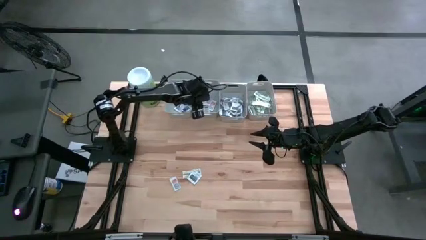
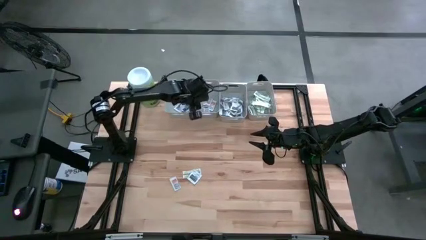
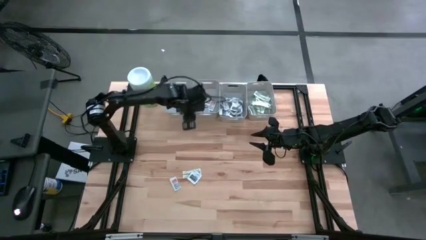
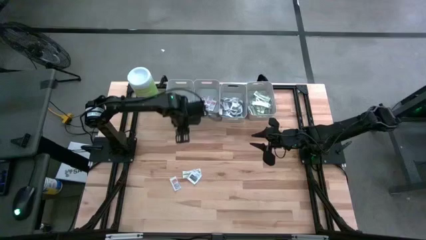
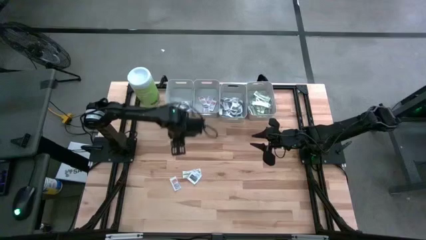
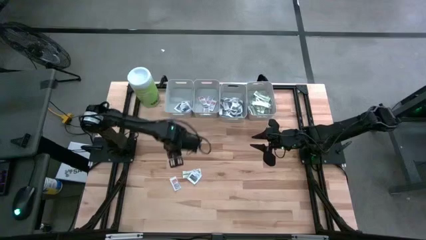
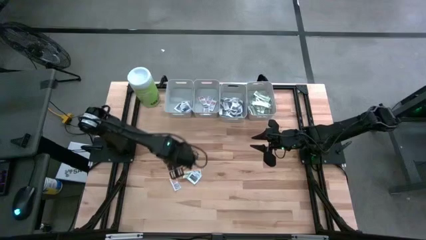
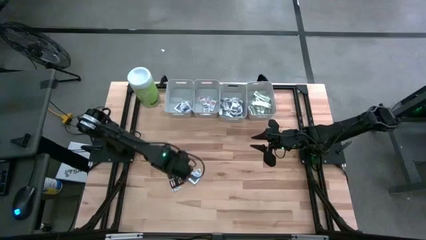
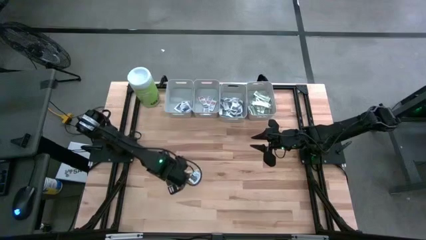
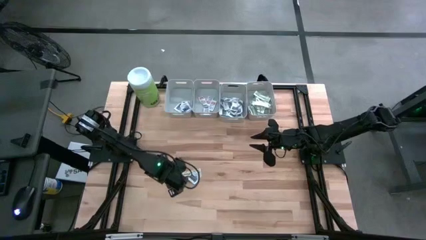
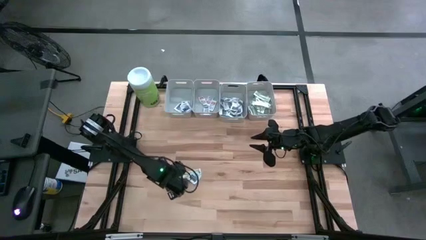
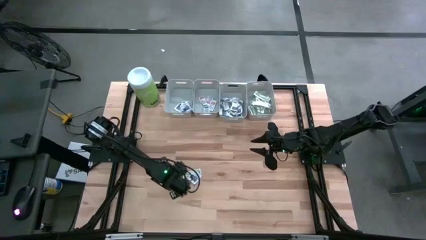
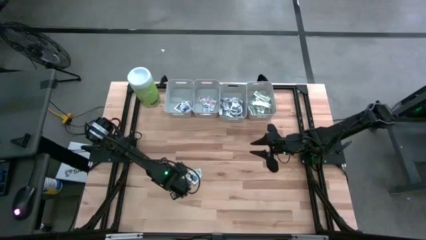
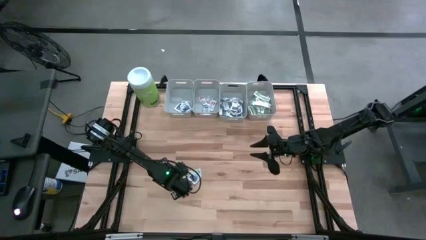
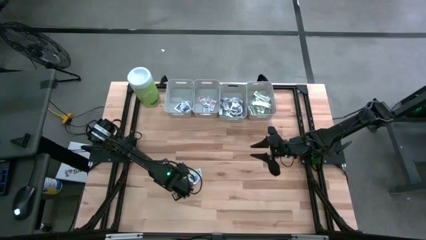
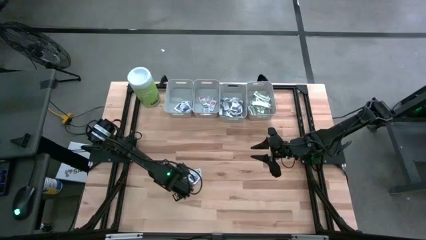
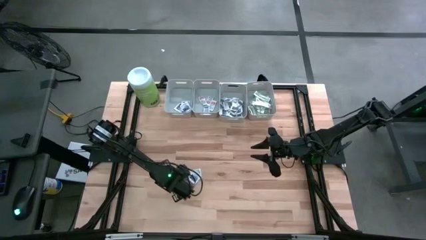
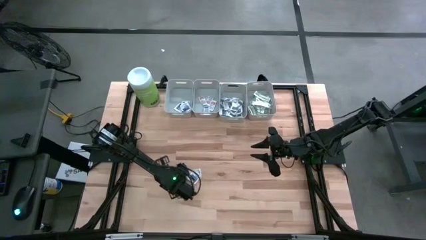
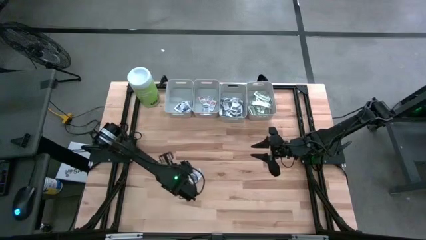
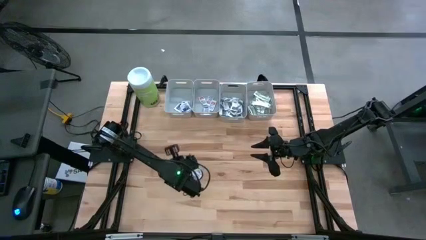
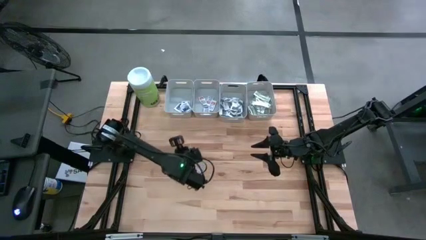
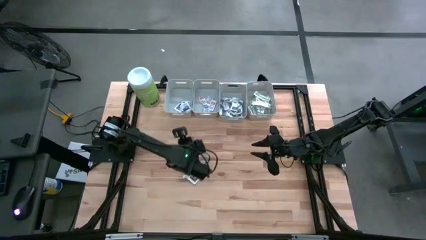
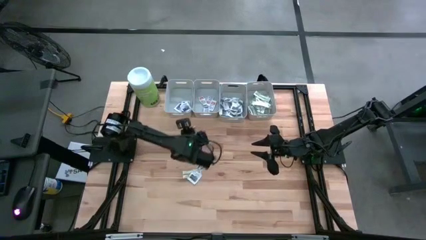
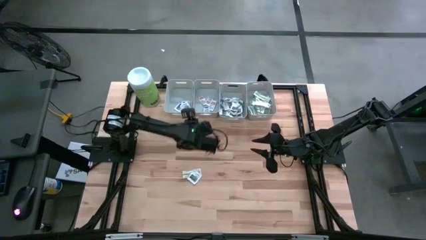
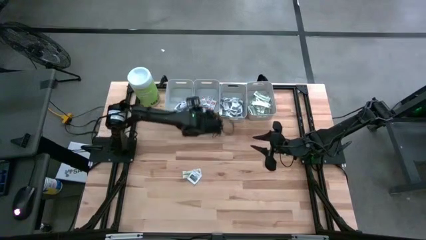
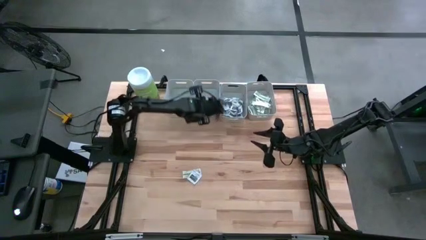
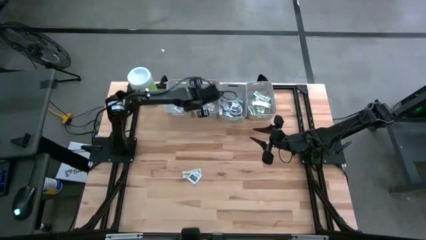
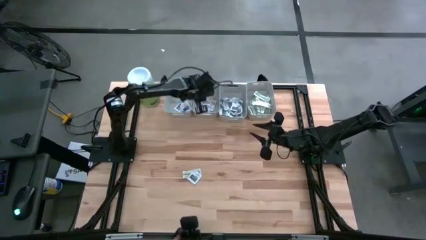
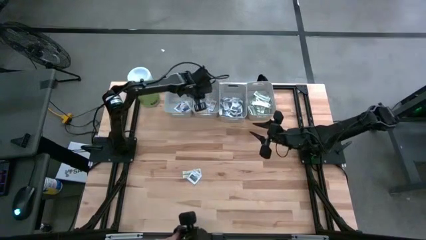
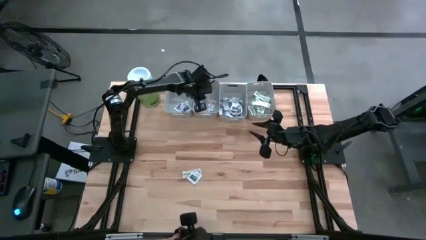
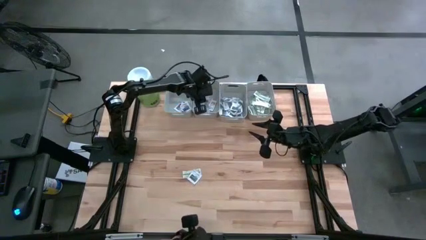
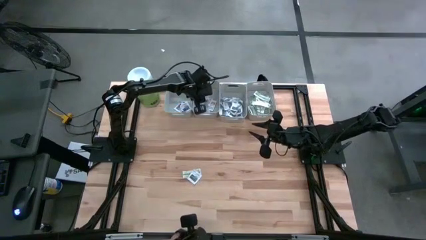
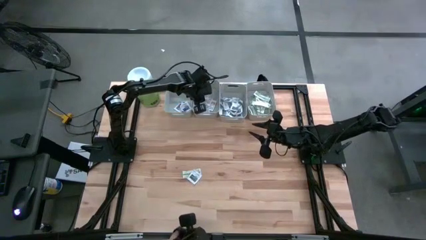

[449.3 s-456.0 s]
Task: Pick & Place First Aid Supplies
Put the ointment pack into the middle left gray bin

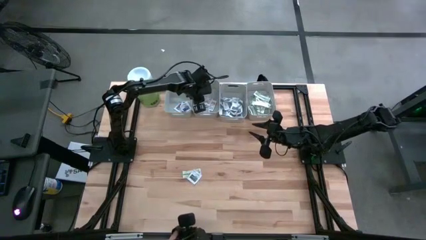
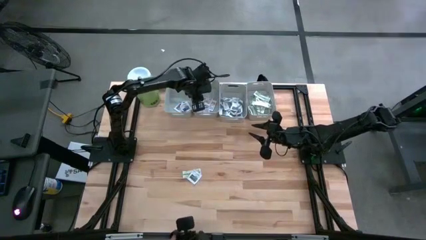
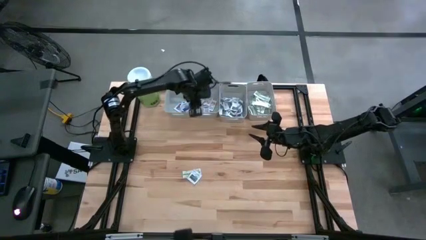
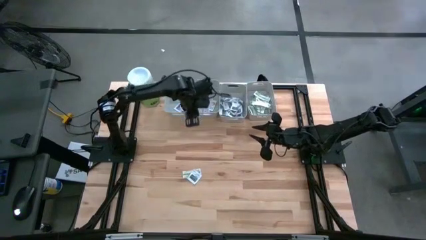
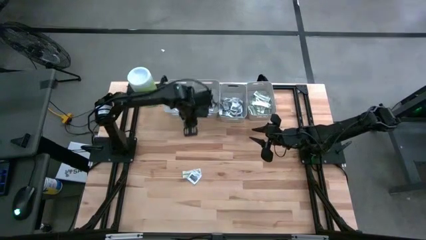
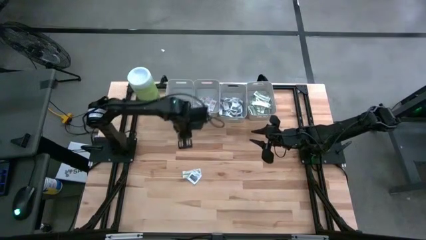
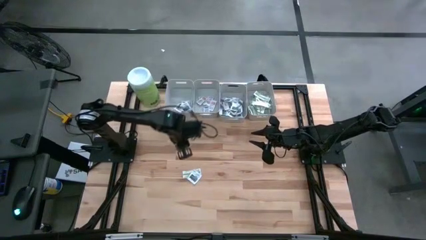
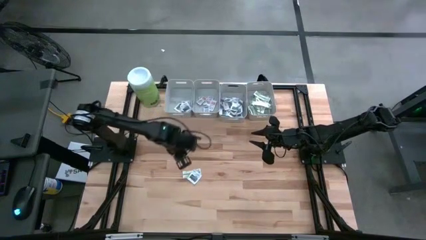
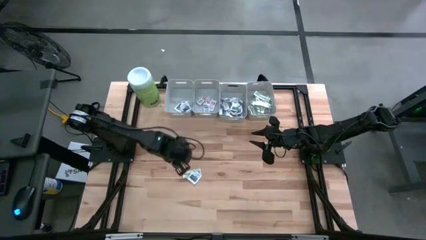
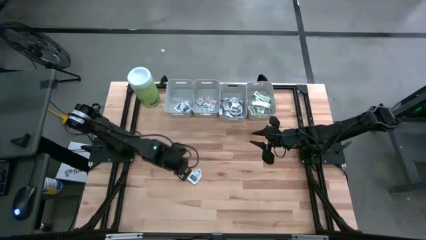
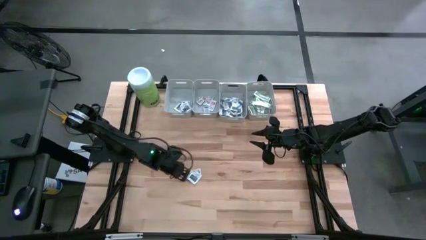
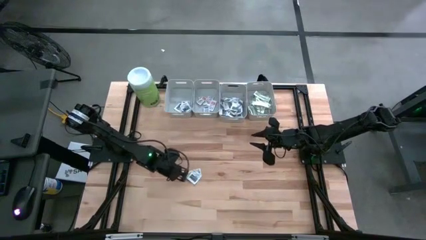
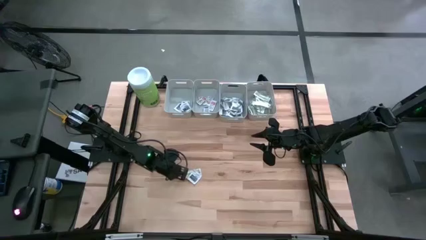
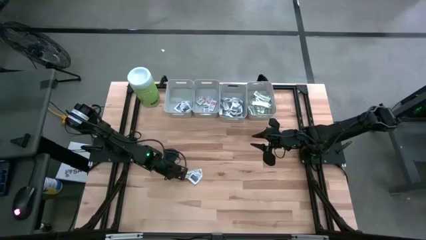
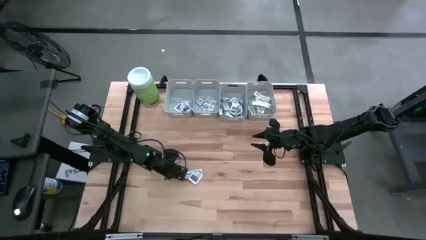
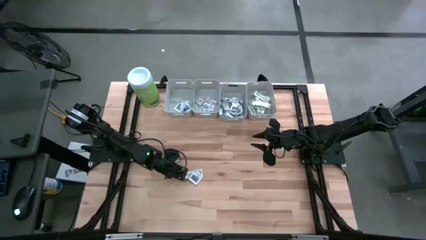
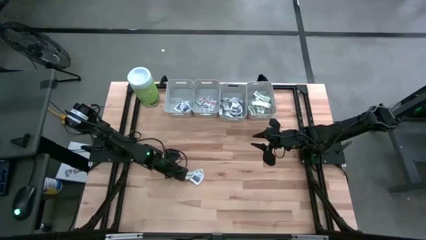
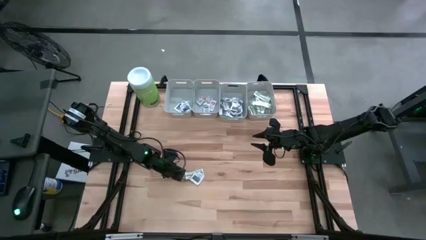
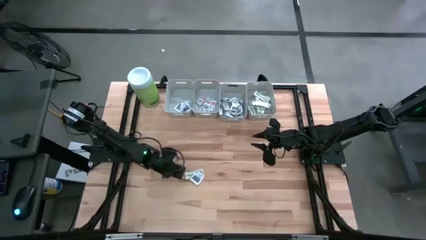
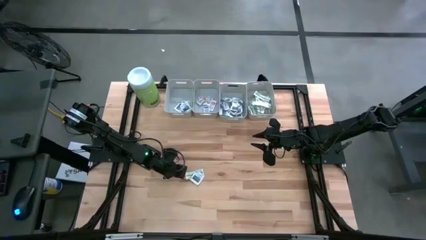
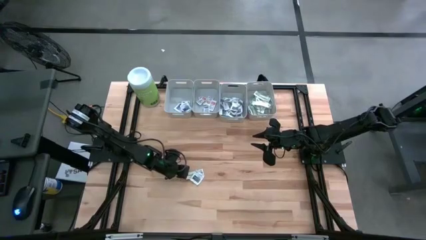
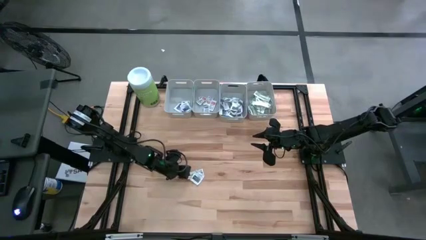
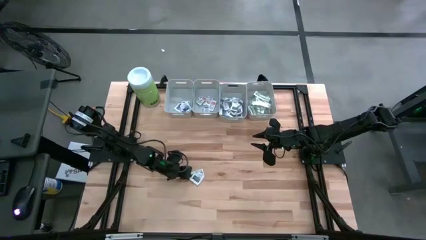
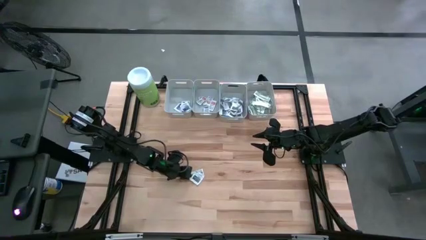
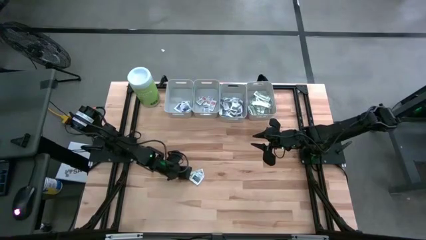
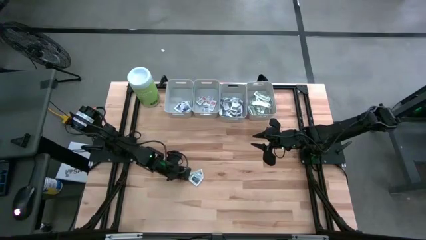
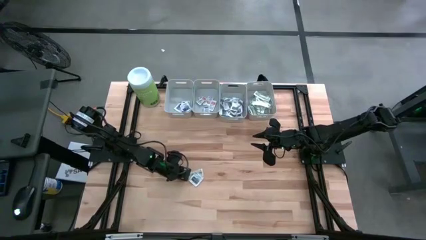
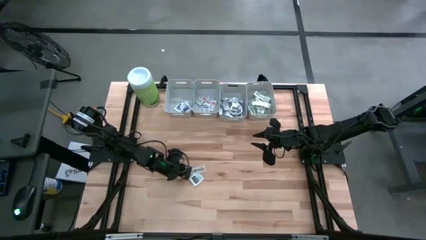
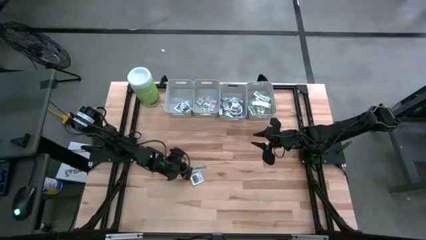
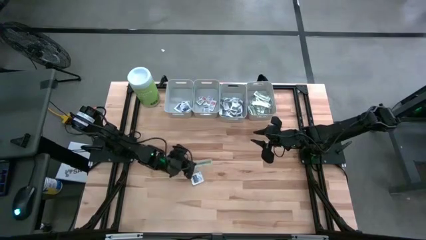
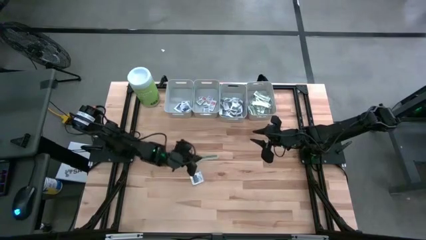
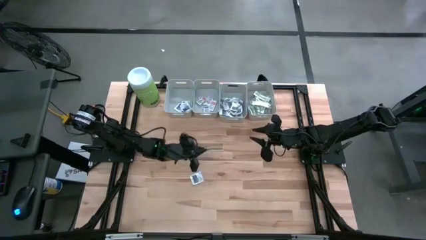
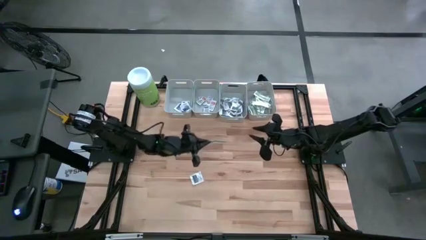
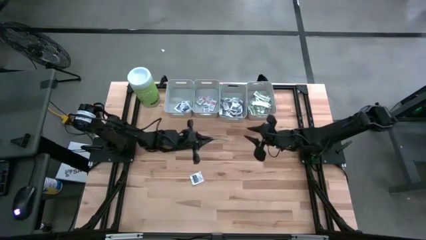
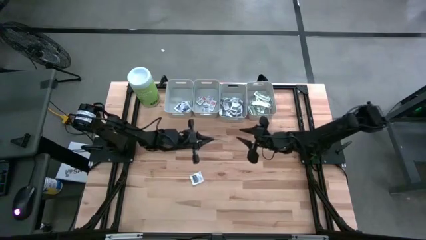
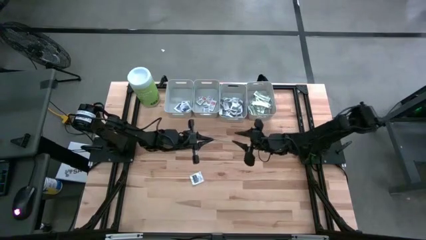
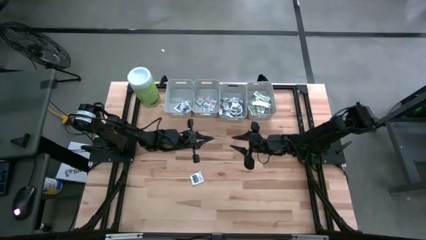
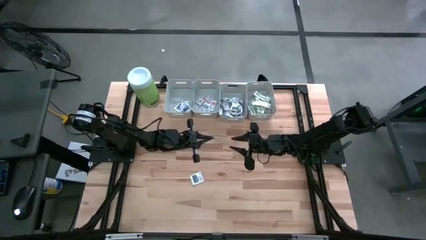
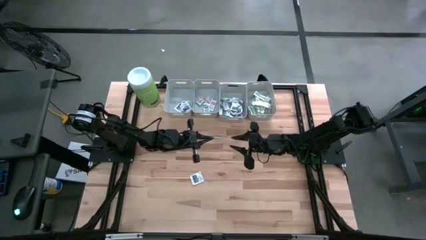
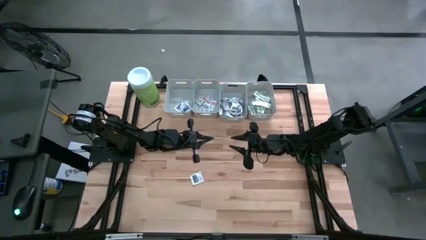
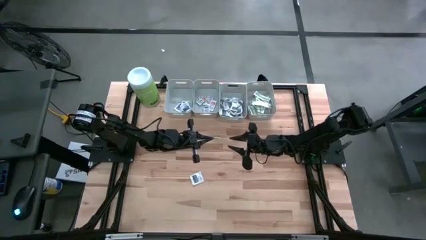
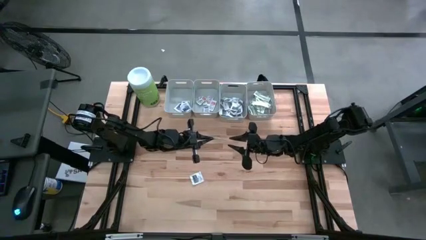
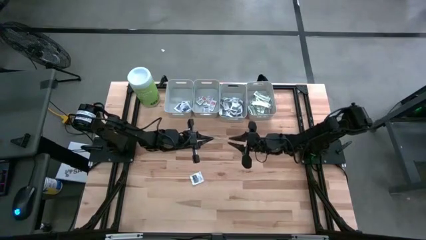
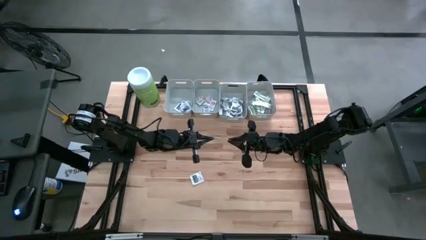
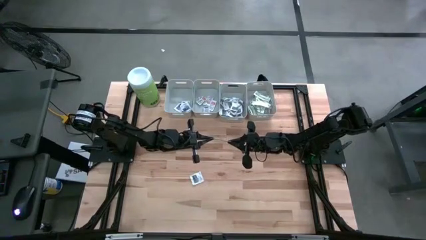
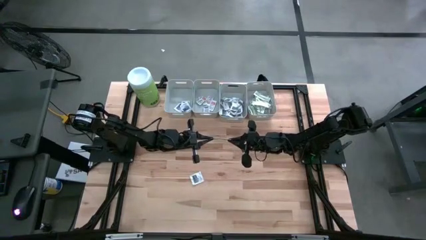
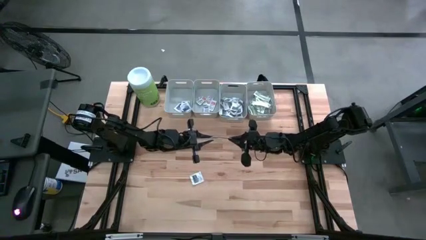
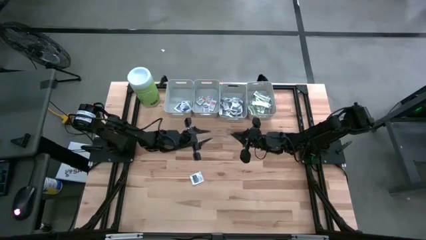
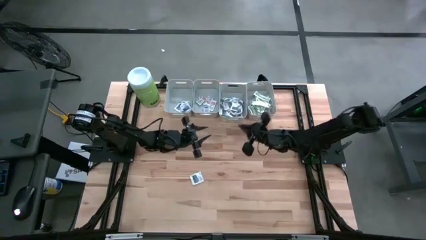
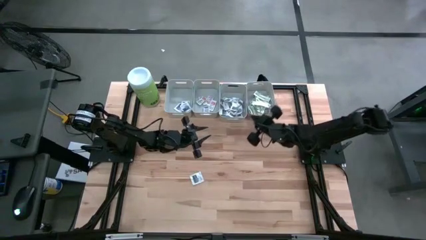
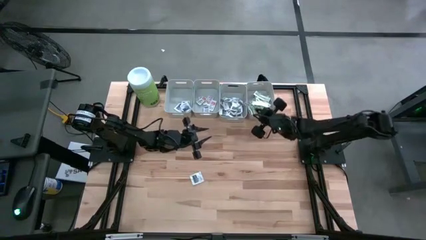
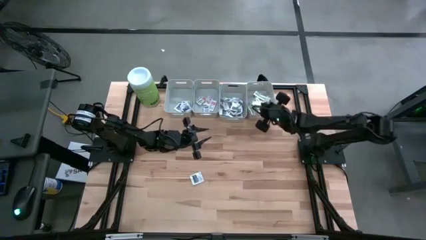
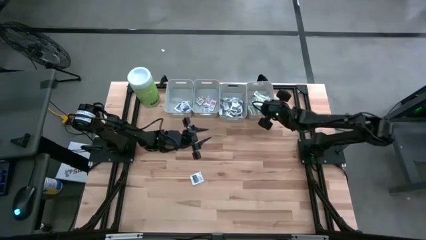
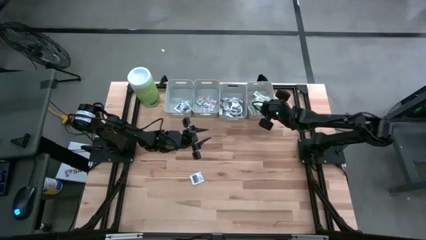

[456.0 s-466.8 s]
Put the bandage into the right gray bin
